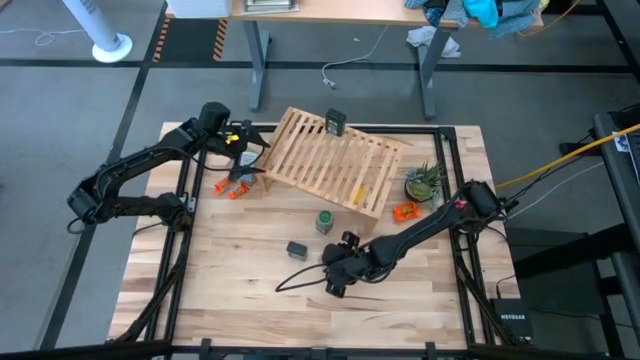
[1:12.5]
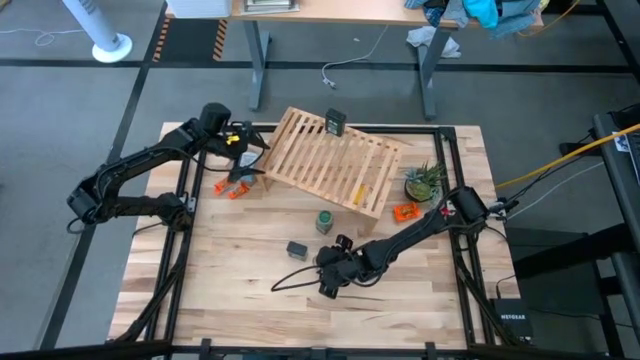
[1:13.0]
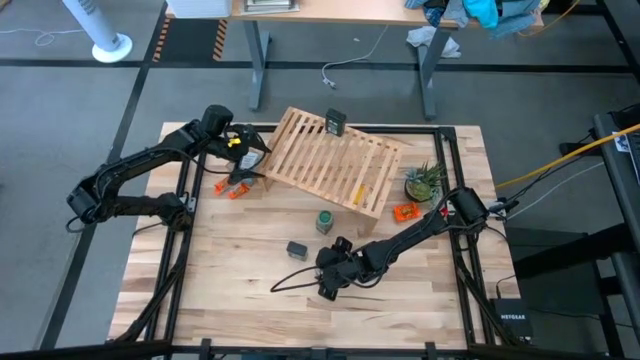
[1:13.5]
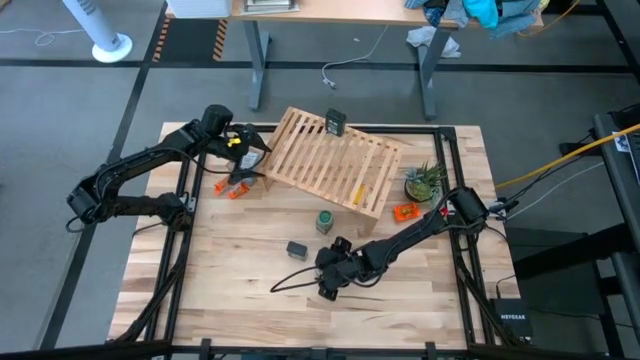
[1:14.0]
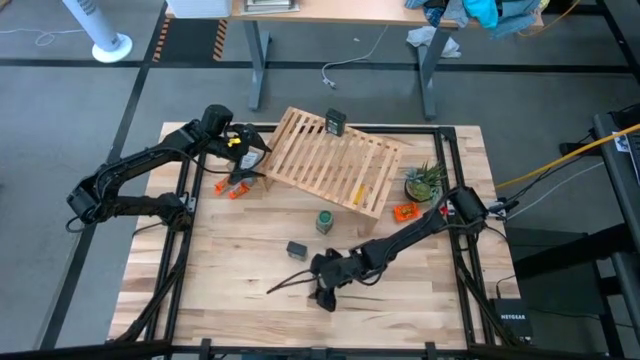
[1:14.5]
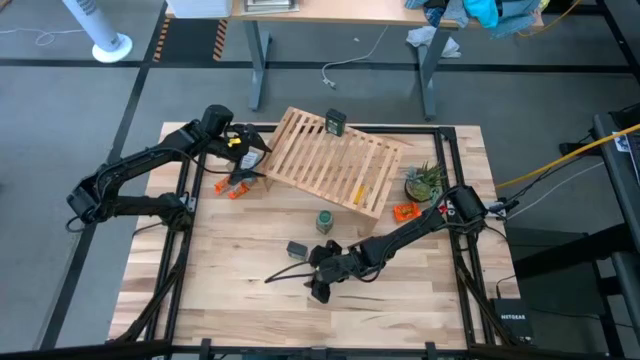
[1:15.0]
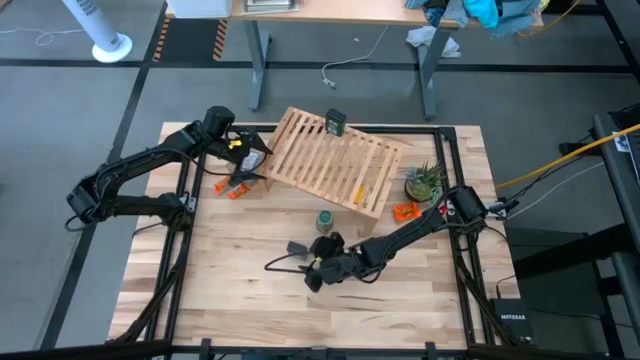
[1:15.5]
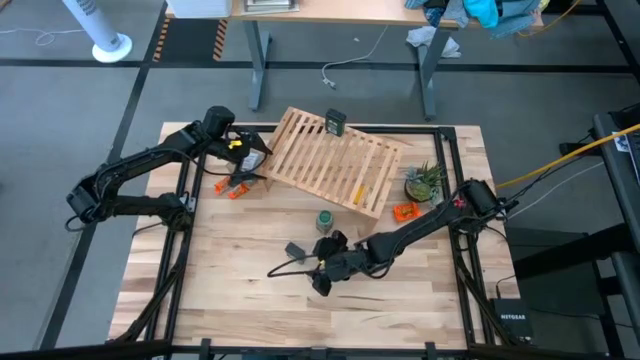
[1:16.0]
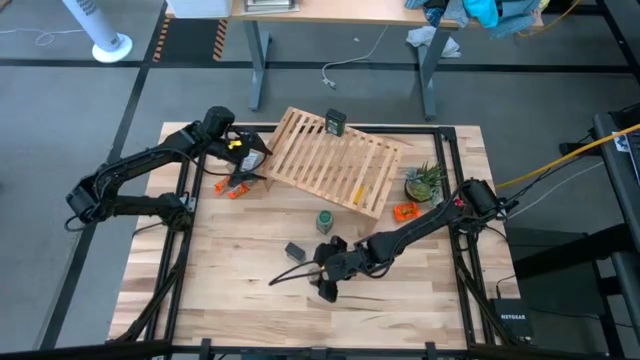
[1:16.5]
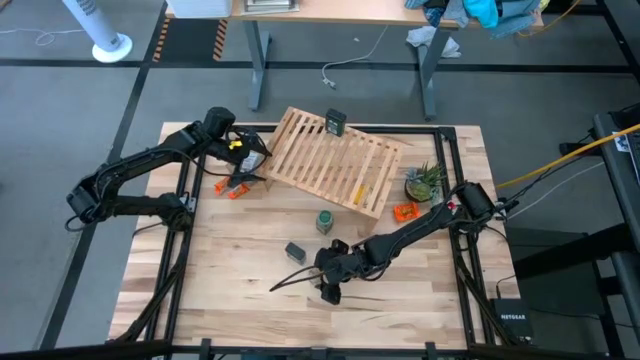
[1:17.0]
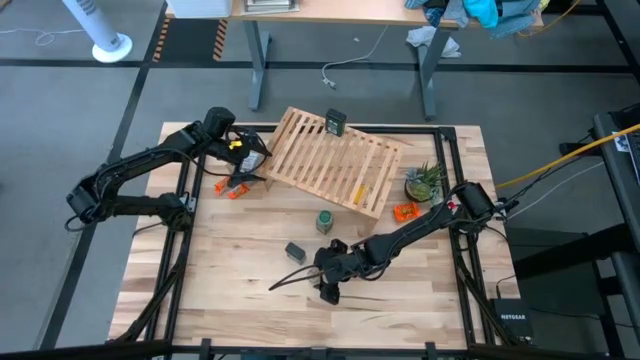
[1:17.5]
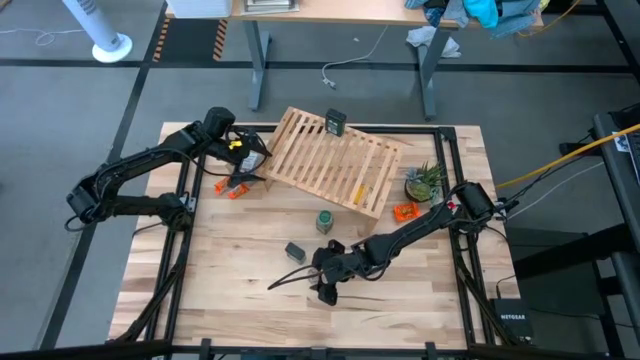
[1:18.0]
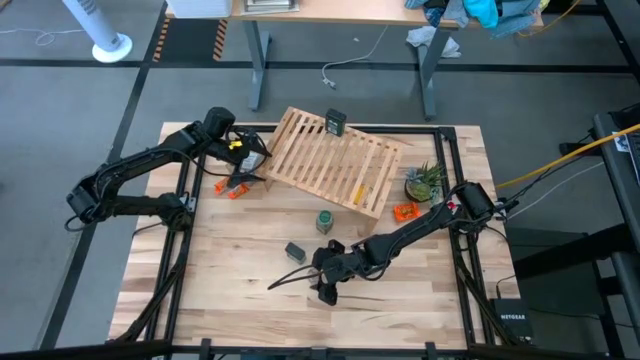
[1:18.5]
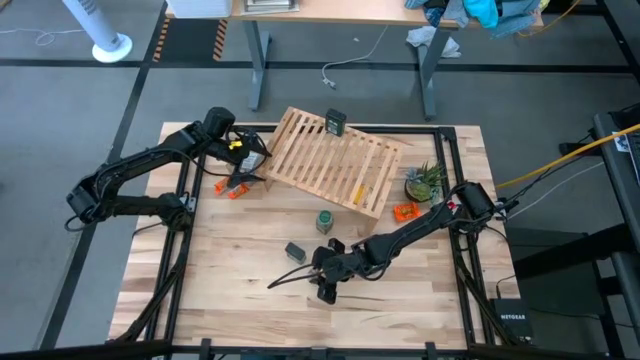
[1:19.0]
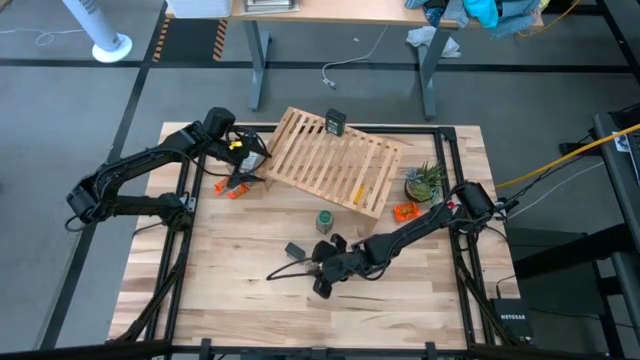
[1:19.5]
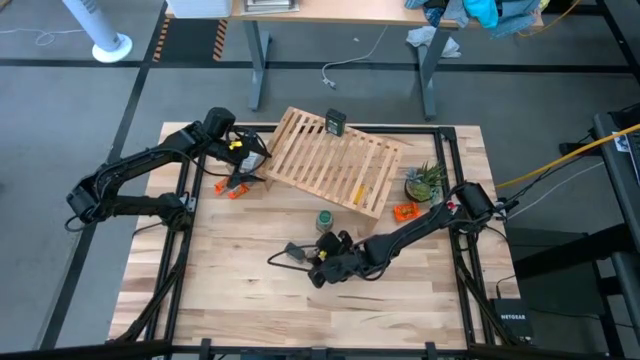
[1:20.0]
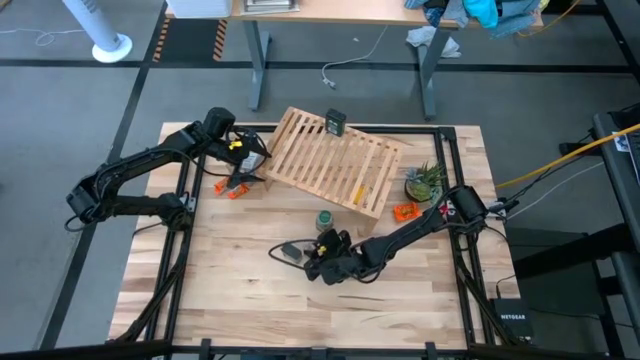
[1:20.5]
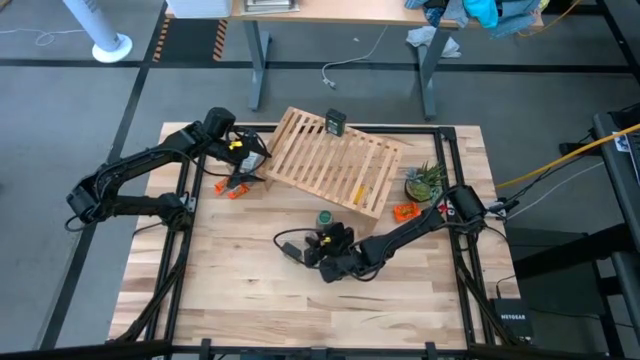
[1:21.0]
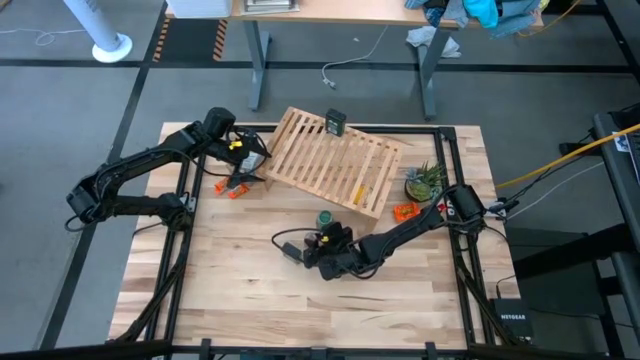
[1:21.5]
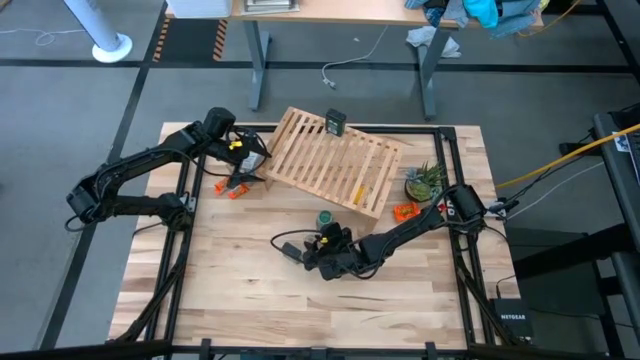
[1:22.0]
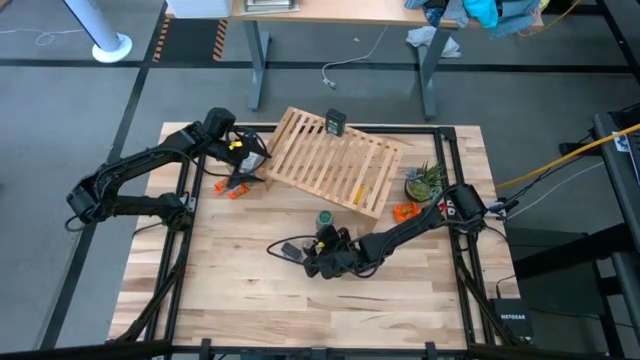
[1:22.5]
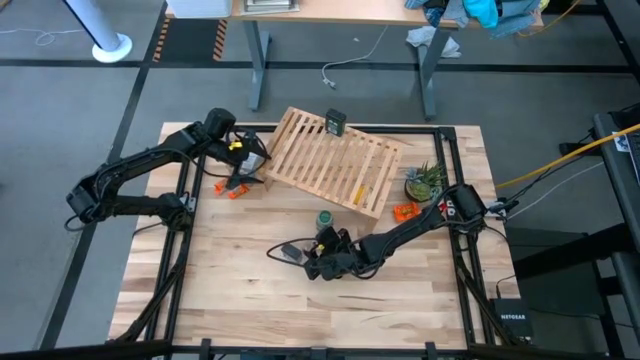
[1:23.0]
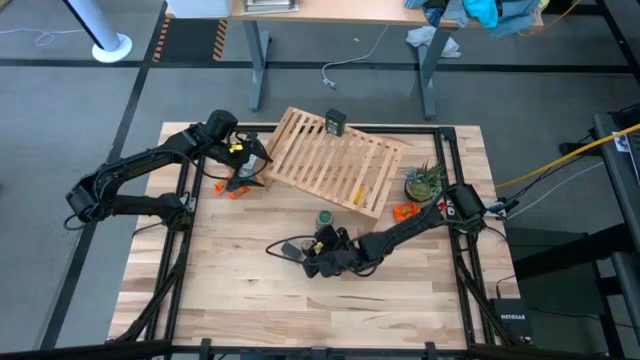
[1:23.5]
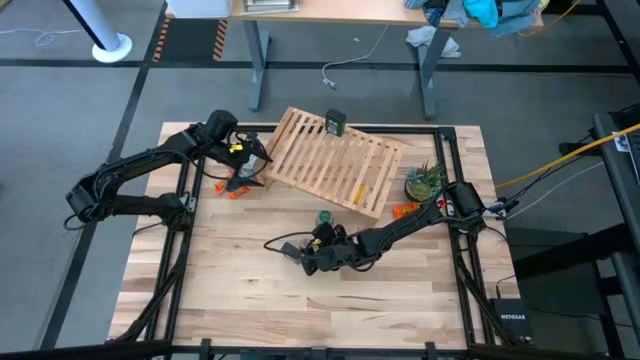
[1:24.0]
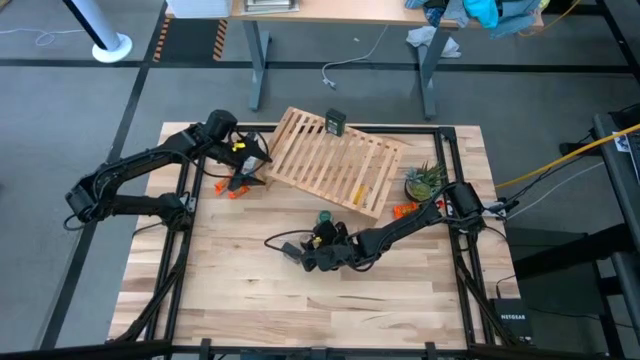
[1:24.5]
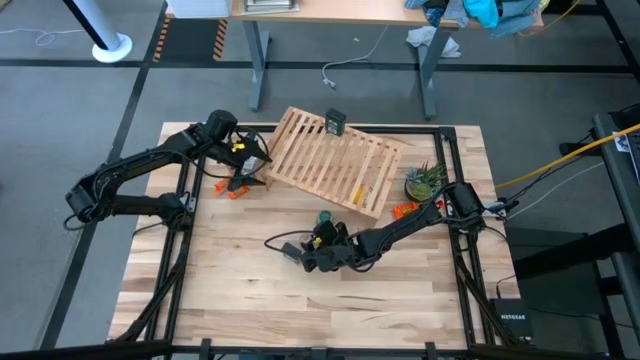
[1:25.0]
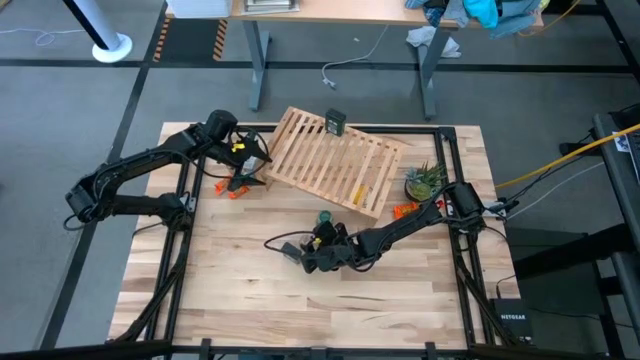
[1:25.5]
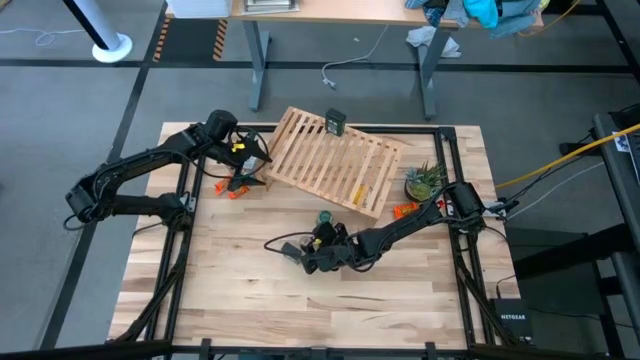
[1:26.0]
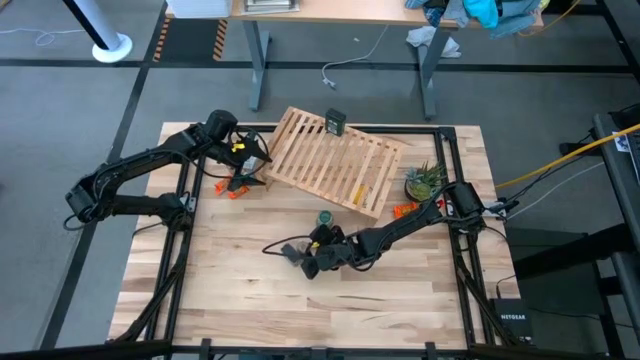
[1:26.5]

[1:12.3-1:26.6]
Task: Shelf spices
Remove the transparent seasoning bottle from the shelf

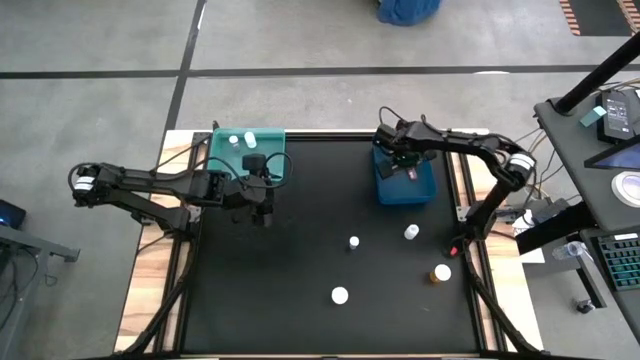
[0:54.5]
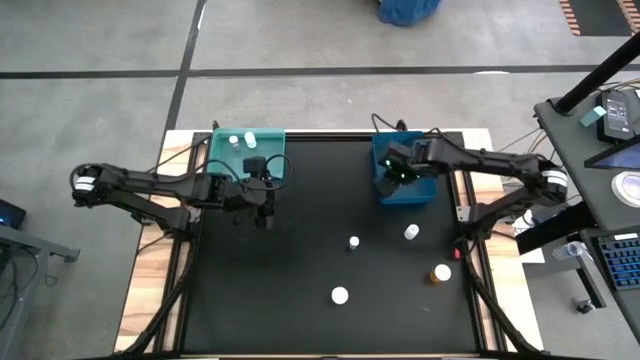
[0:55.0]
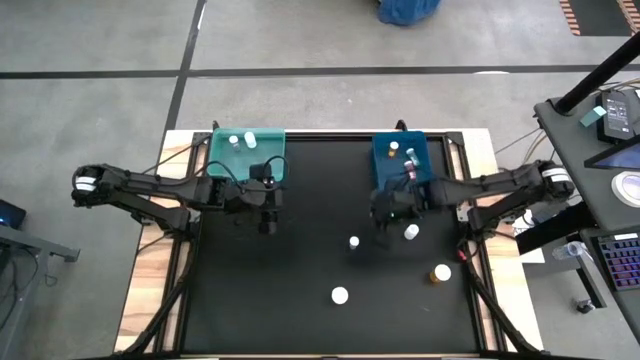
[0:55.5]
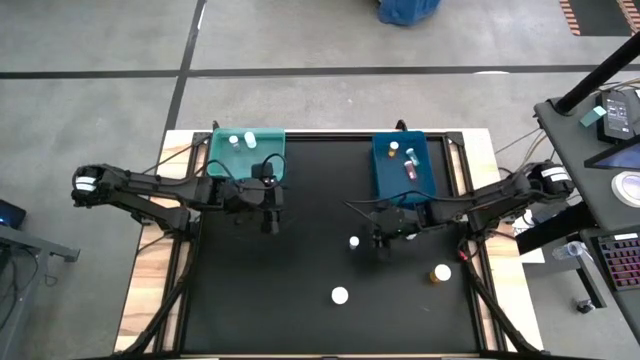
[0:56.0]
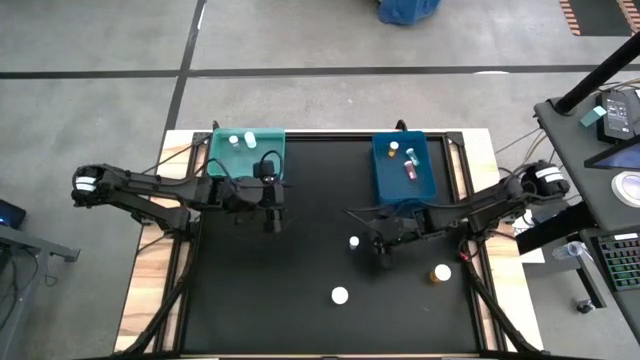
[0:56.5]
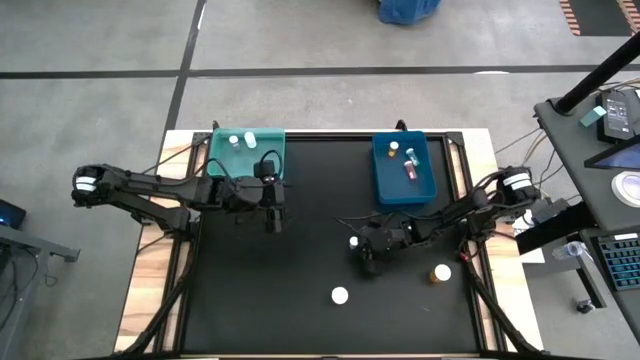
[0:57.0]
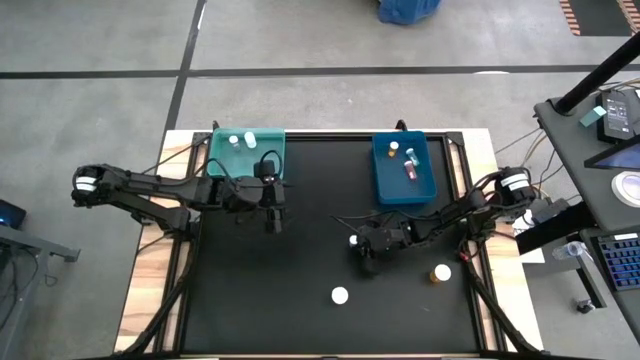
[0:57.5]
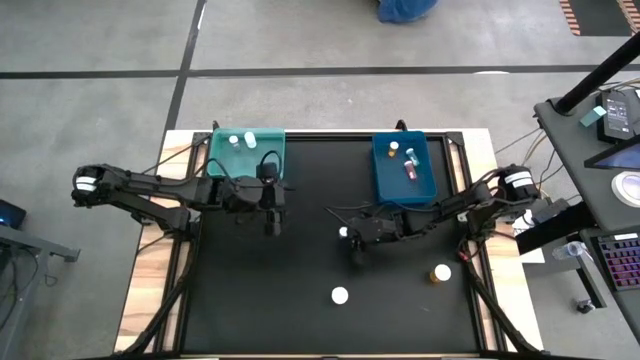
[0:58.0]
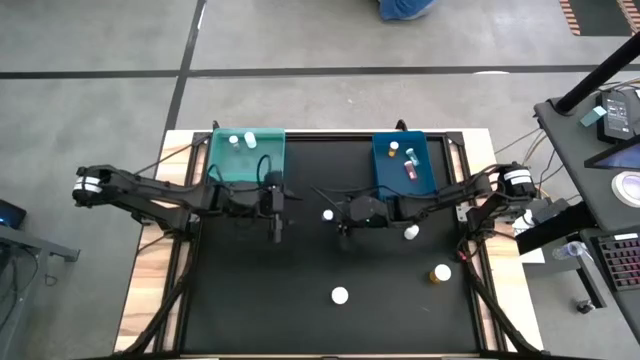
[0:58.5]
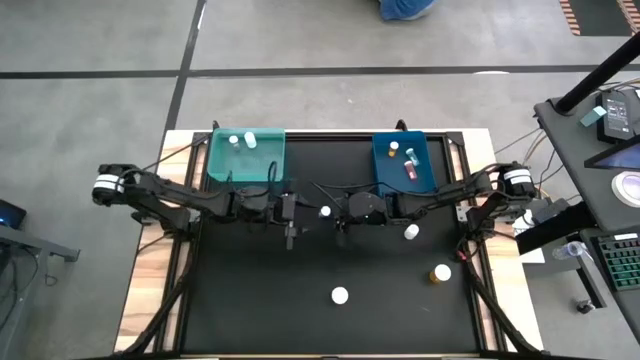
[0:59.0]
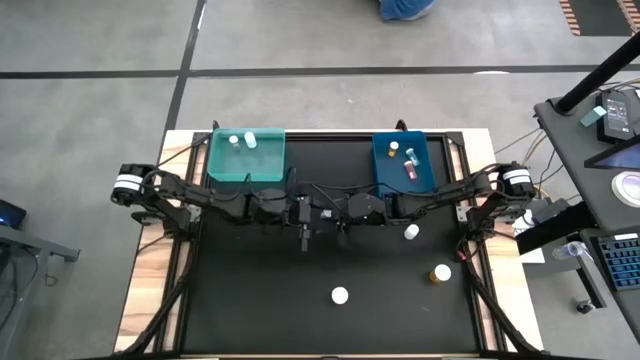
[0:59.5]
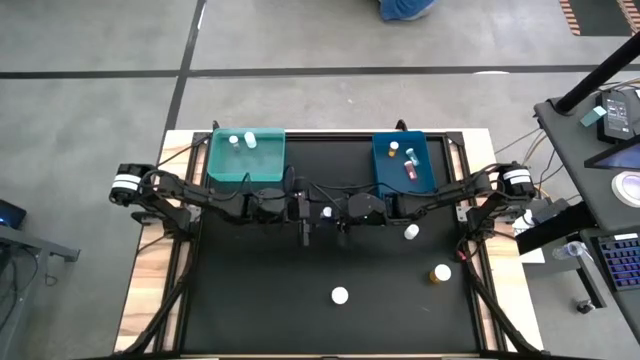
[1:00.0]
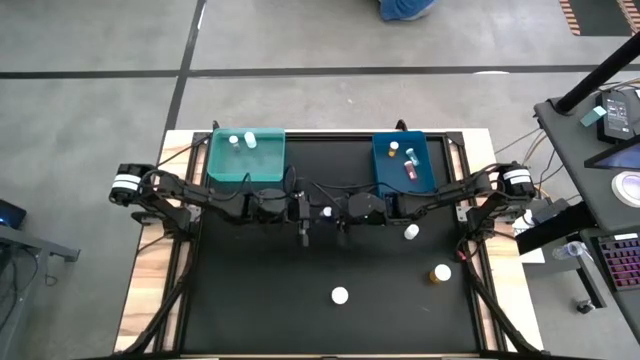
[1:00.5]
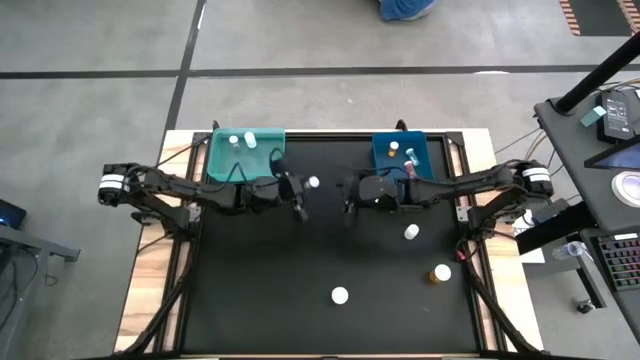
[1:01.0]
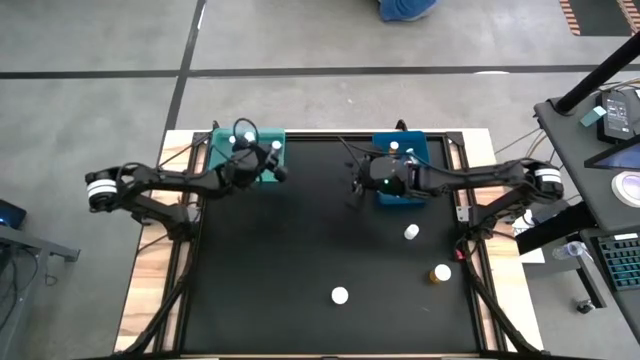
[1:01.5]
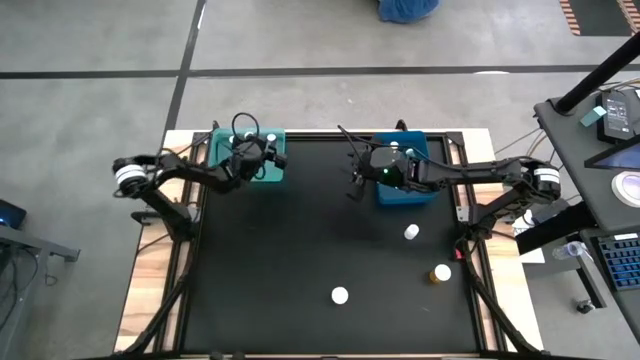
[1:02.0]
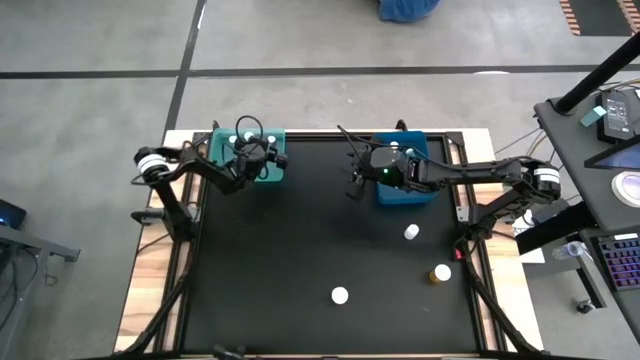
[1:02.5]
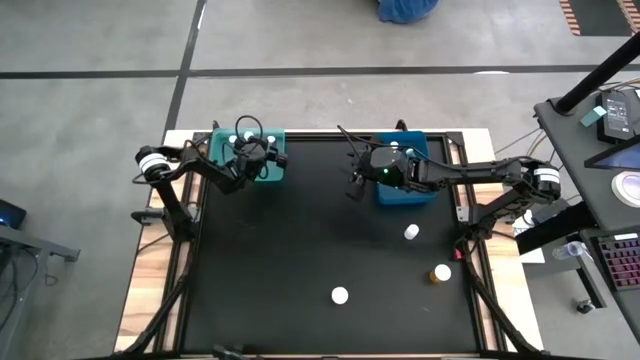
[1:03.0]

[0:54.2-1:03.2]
Task: Pick and place medicine bottles into bin by pill shape (circle, oval)
Put the blue capsule bottle into the light blue bin
